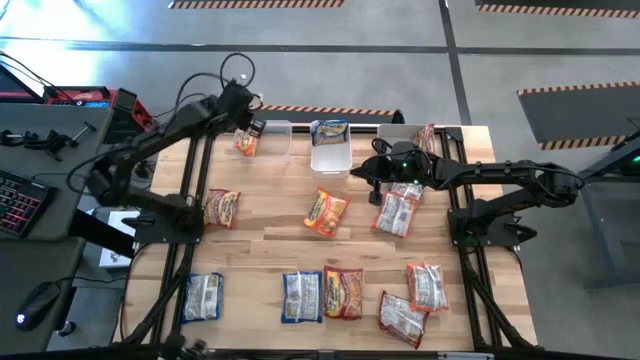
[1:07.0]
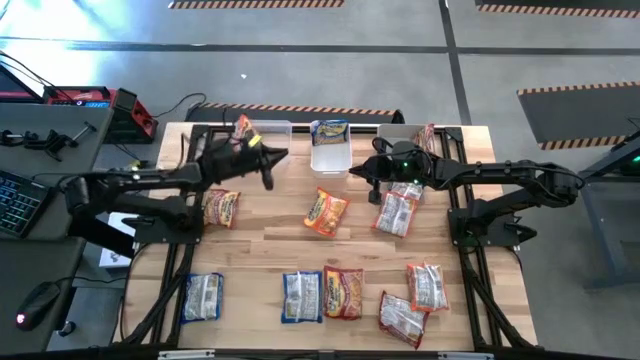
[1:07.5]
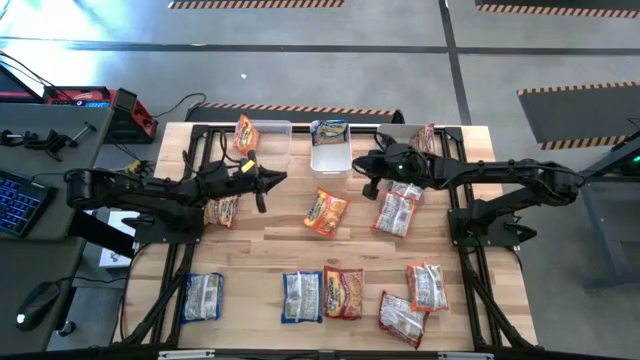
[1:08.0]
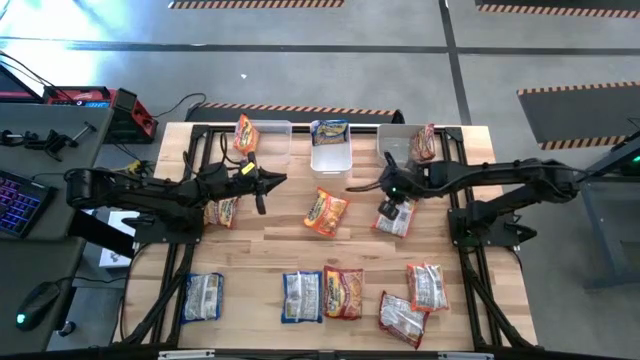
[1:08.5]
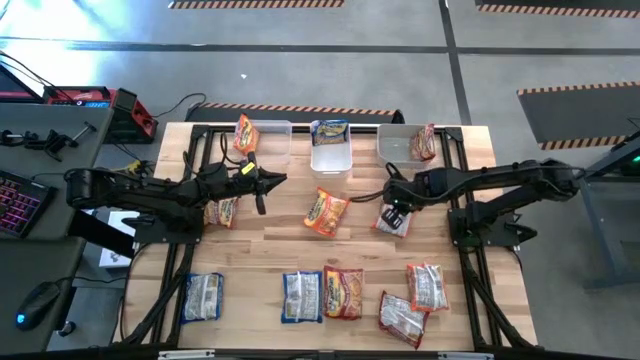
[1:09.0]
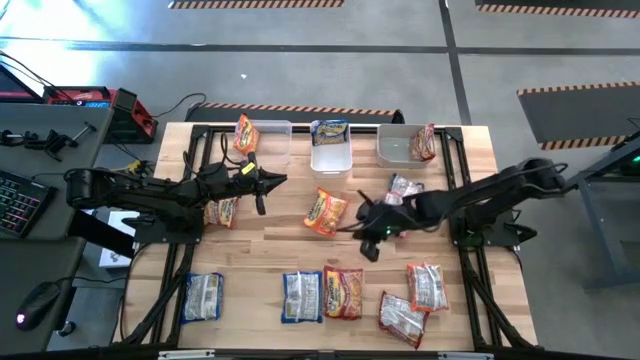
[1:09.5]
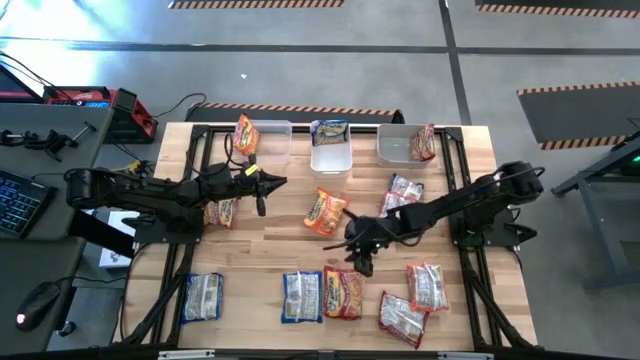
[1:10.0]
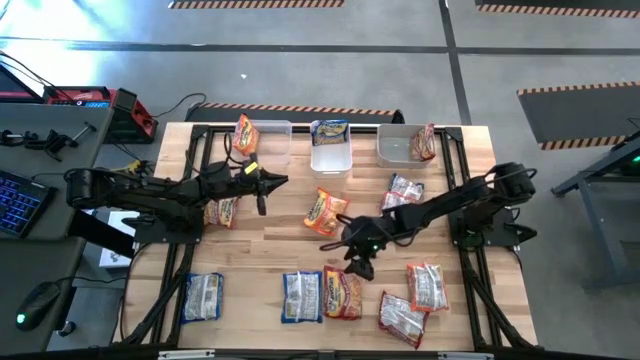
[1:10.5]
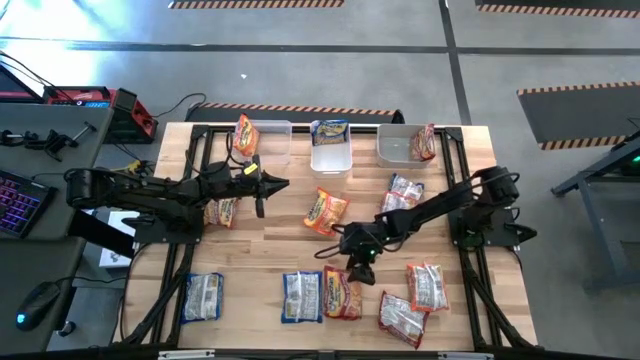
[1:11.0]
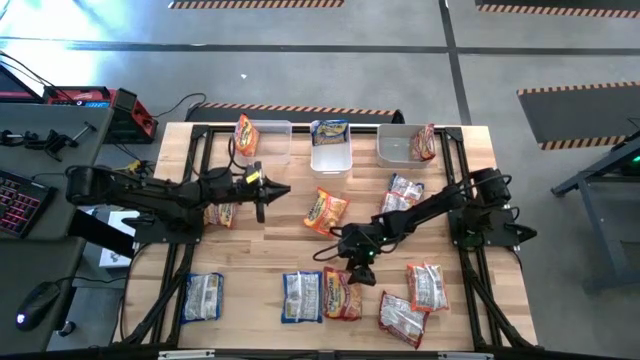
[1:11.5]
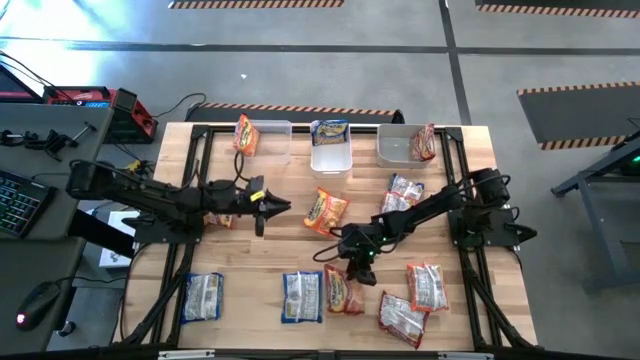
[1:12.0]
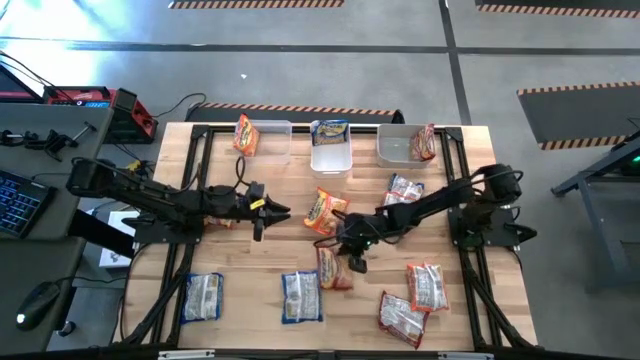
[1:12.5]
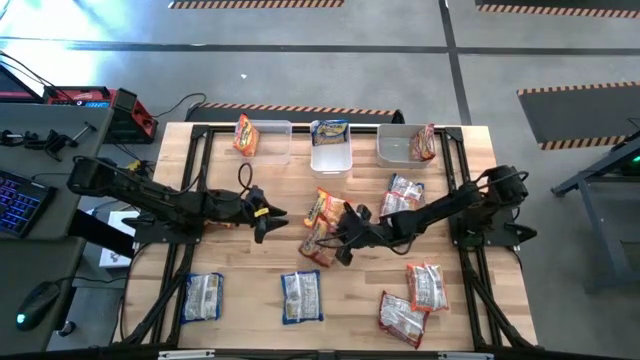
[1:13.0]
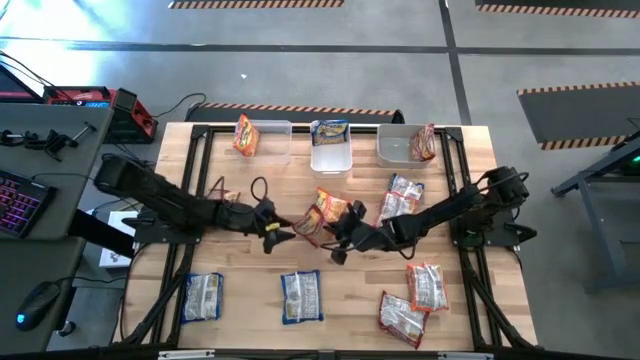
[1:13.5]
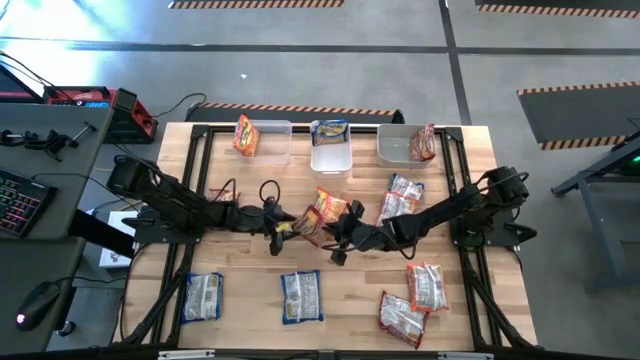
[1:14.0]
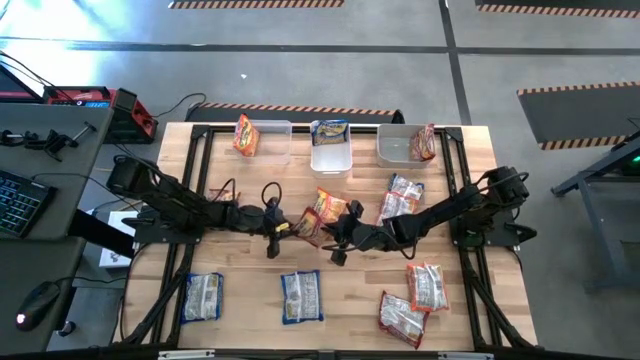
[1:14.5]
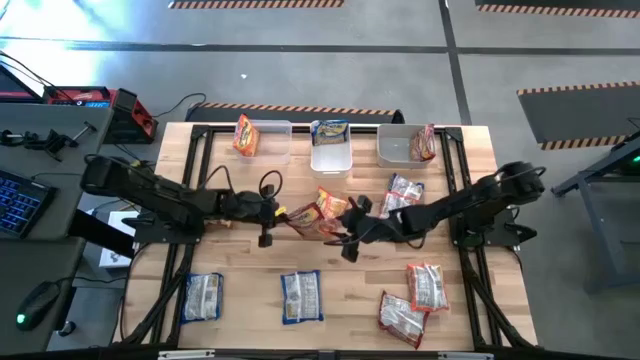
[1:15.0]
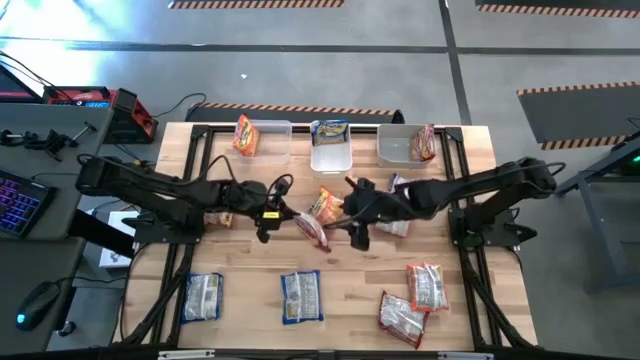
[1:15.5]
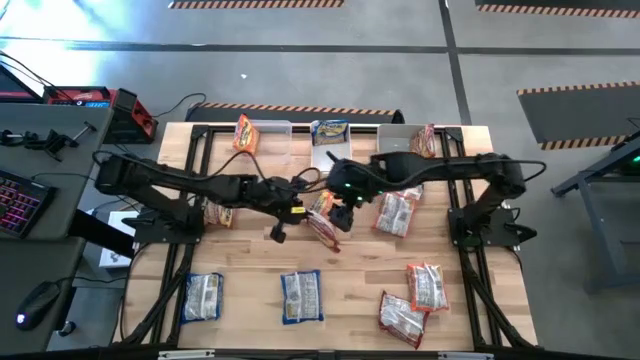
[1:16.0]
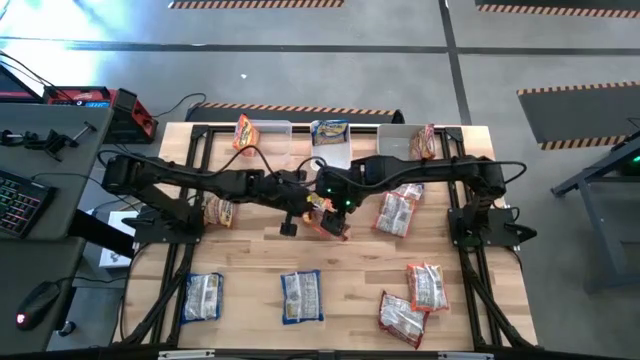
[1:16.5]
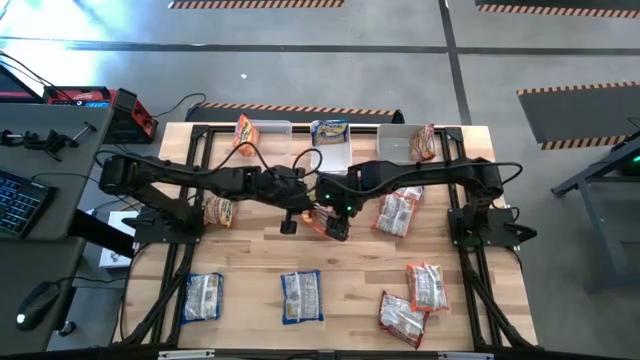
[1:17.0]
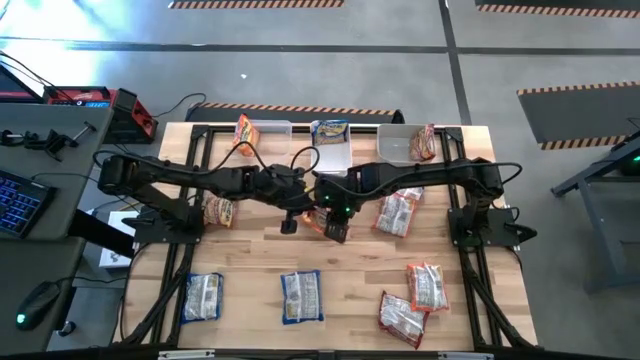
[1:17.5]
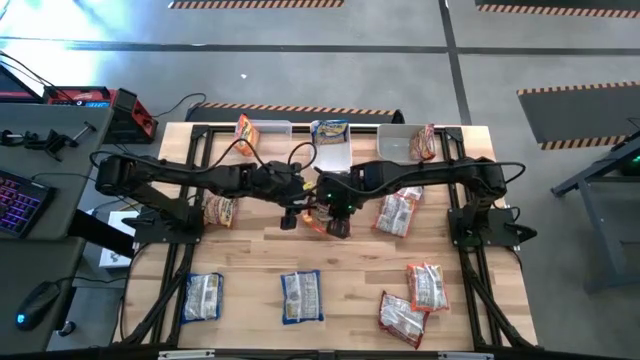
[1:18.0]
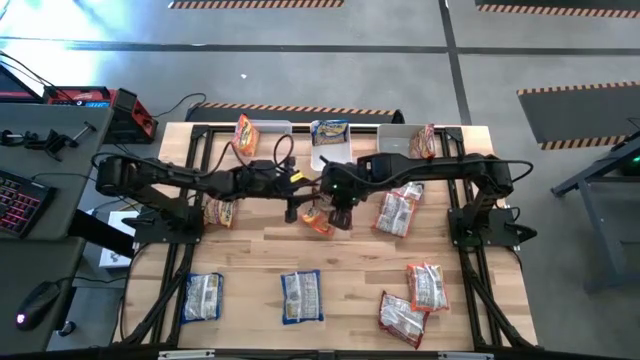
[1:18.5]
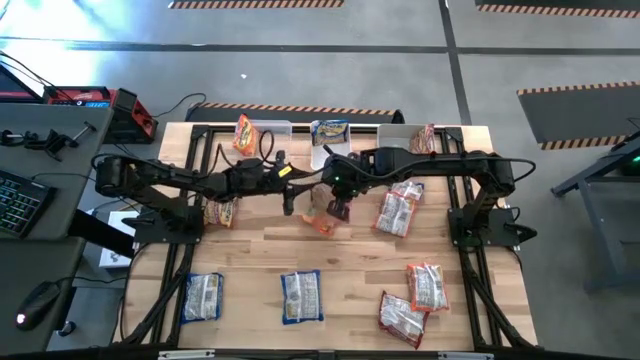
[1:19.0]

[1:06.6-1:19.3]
Task: Sort Maruchan noodles
Put the middle red noodle pack into the gray bin
